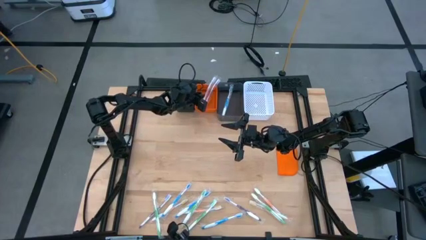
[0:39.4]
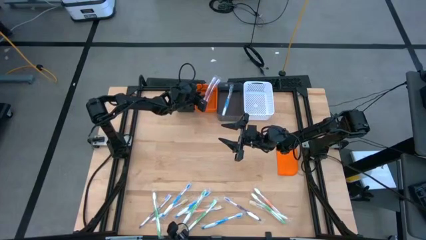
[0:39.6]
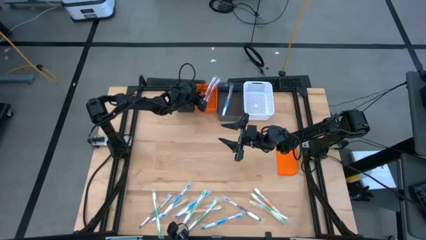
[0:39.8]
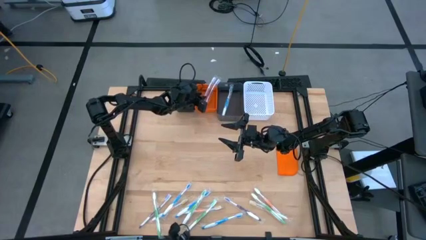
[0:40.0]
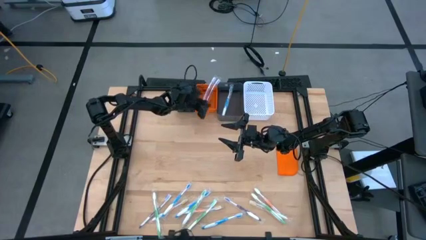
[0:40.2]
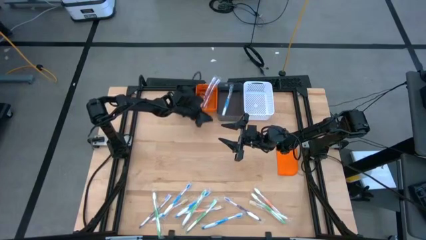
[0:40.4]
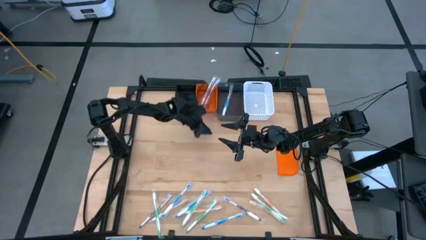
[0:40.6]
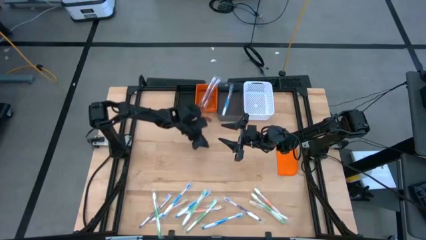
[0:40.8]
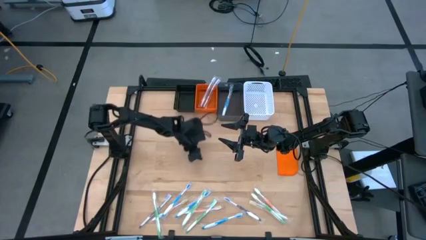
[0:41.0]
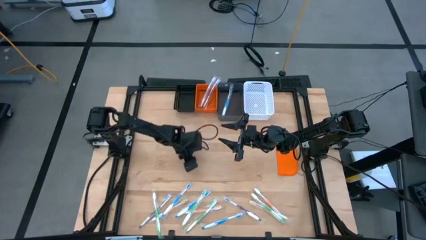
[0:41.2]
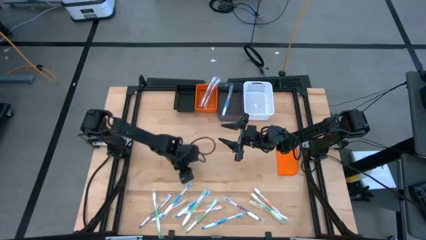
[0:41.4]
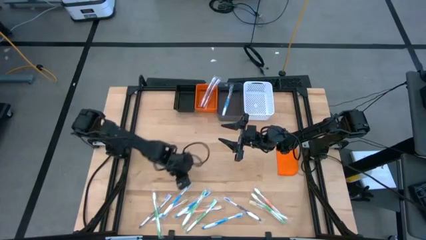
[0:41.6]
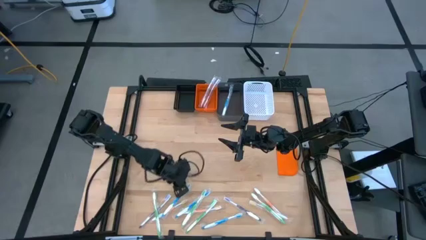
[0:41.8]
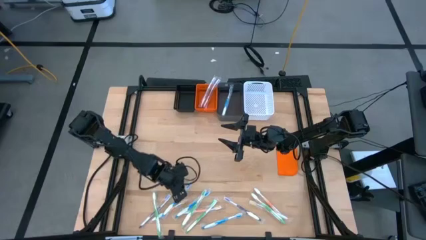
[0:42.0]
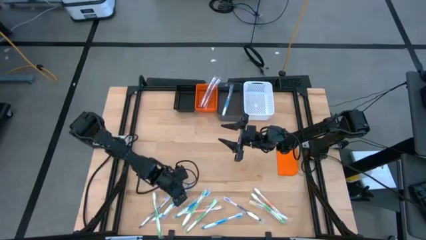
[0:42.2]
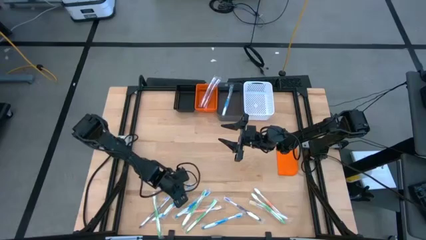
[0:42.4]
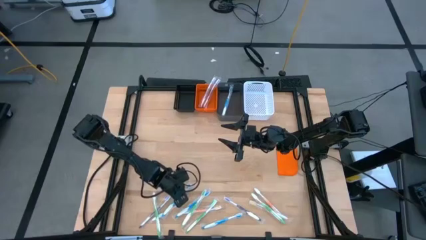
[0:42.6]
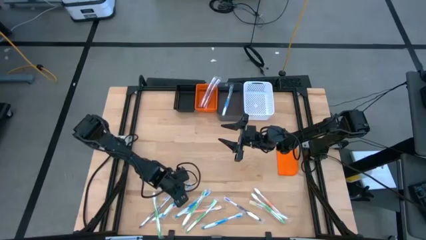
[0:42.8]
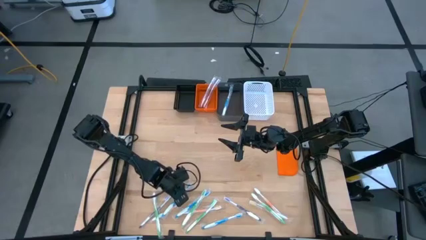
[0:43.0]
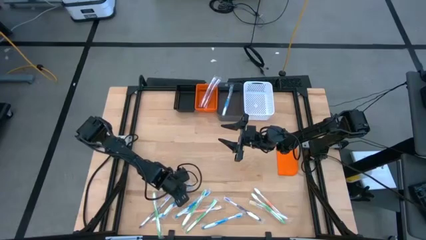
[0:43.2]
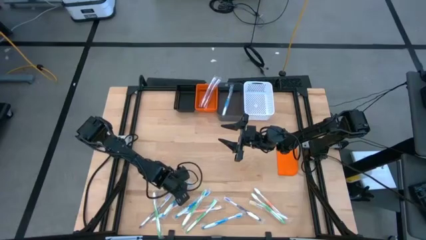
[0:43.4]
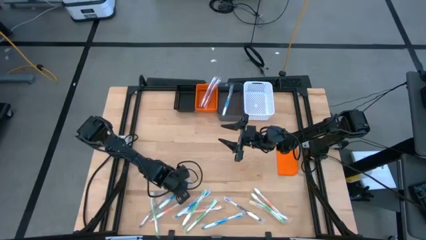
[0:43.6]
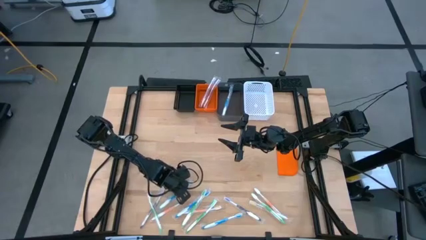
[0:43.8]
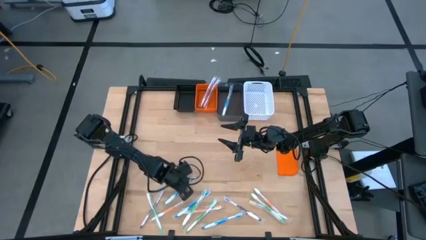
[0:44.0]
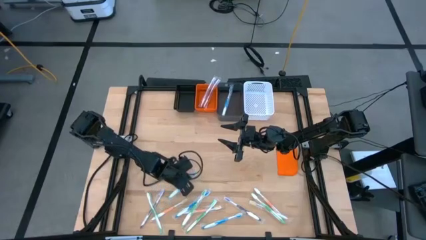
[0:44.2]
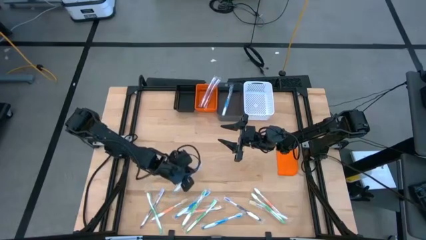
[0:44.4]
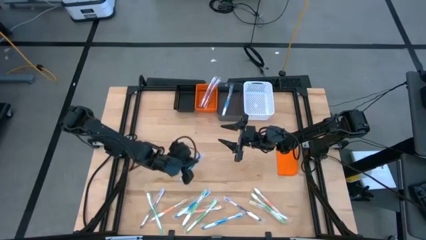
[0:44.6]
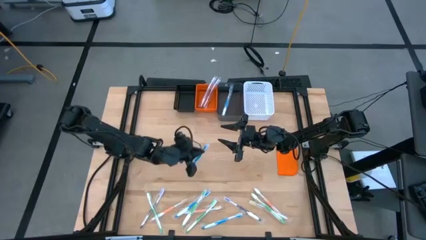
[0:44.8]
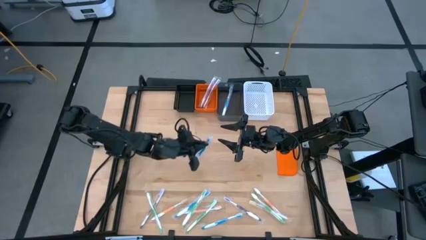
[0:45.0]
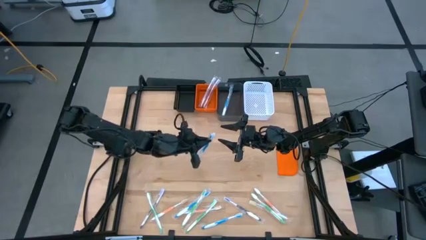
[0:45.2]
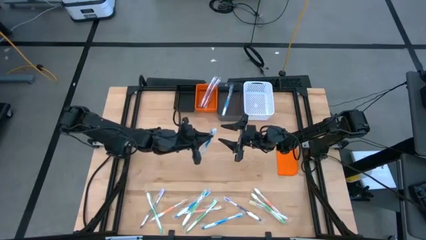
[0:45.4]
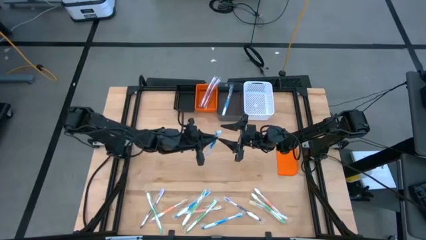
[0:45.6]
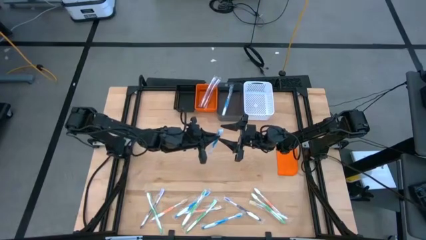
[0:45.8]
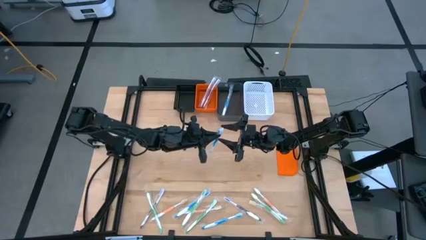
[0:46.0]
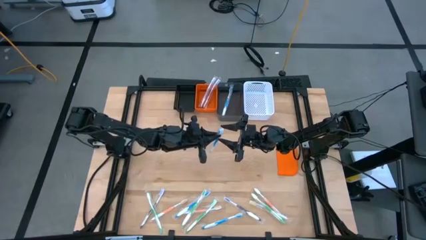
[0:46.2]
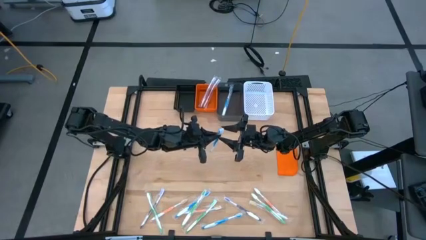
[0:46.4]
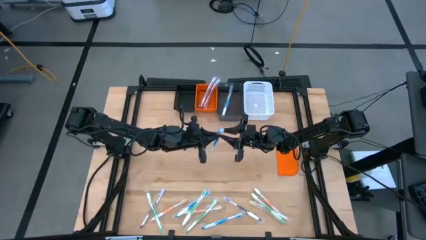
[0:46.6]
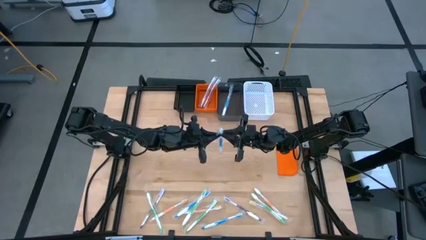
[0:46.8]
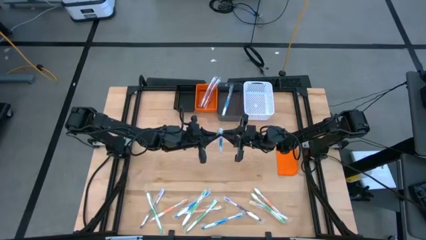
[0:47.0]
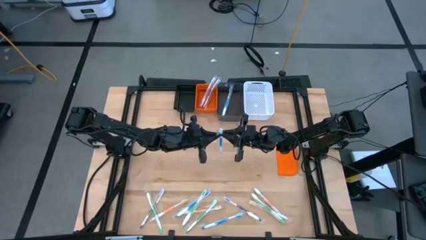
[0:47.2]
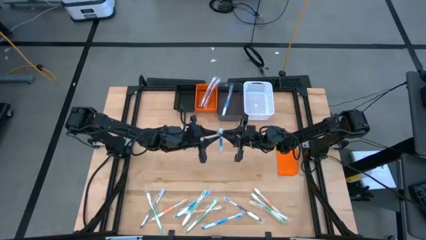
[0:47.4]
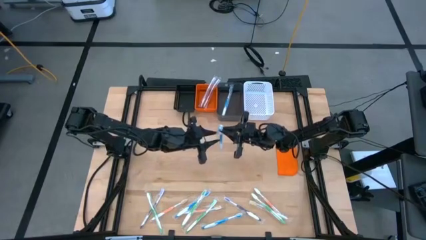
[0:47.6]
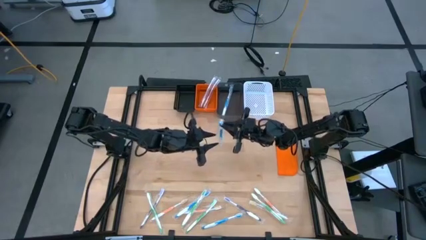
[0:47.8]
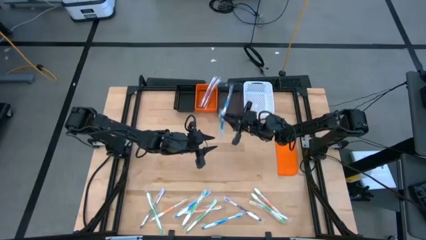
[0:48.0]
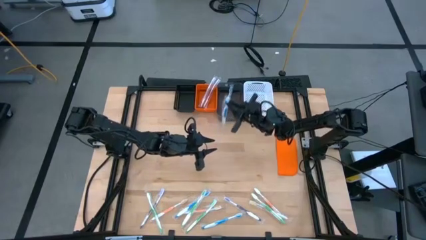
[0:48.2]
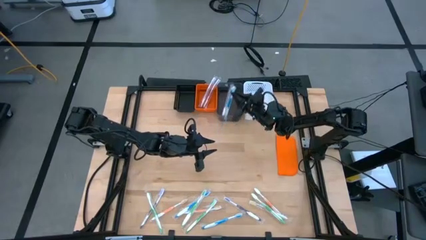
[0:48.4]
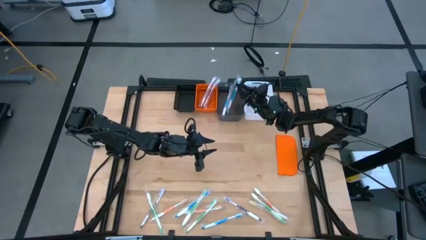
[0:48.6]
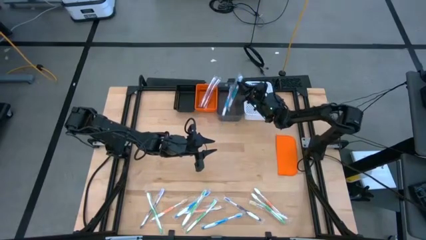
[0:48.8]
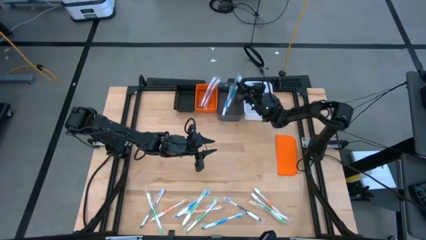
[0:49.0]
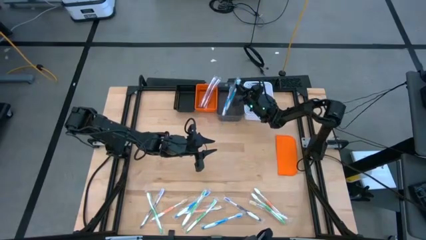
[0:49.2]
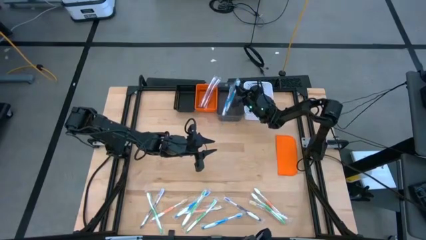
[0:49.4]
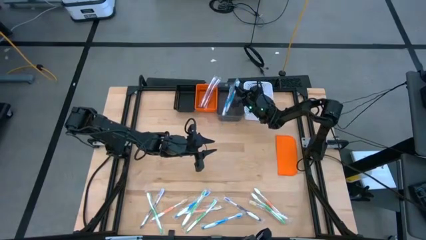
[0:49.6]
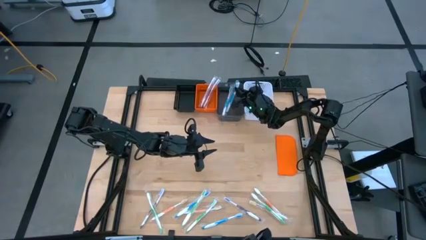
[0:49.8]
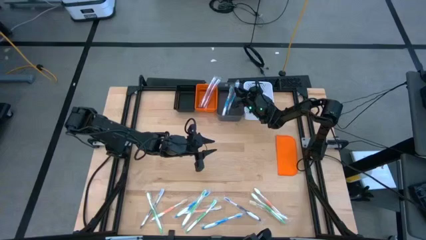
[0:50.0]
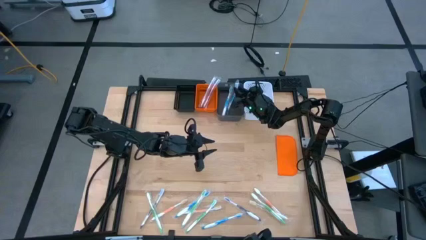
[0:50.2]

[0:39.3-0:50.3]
Task: Pick & Place Toothbrushes
Put the blue toothbrush into the gray bin

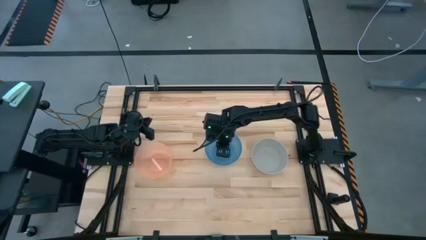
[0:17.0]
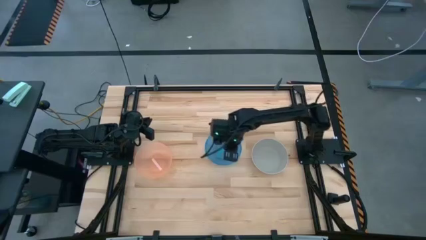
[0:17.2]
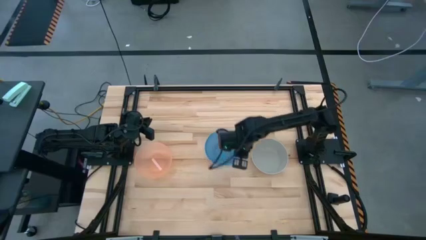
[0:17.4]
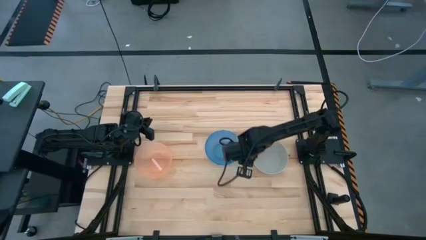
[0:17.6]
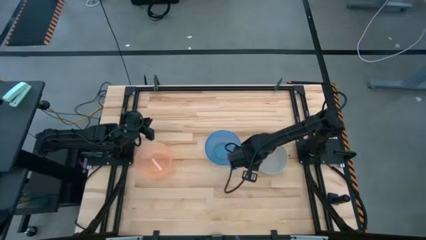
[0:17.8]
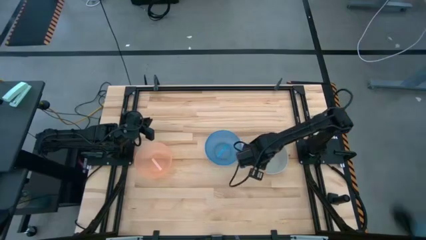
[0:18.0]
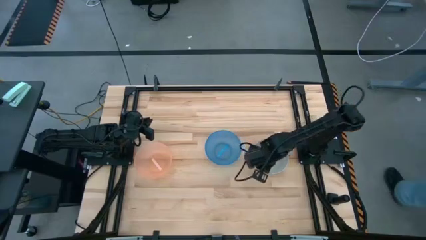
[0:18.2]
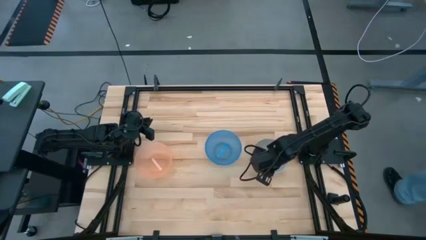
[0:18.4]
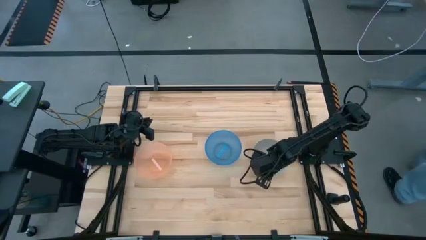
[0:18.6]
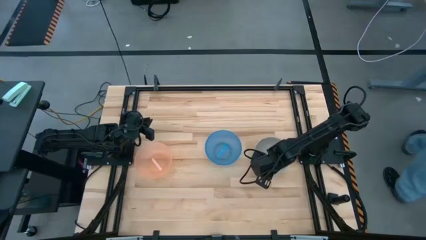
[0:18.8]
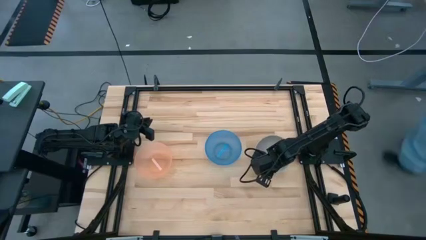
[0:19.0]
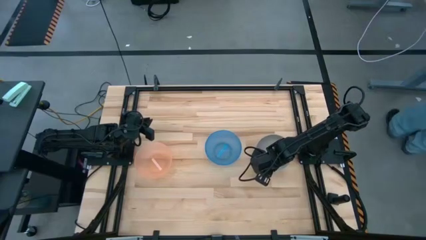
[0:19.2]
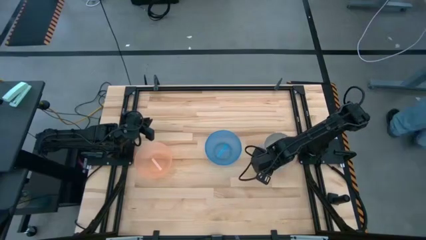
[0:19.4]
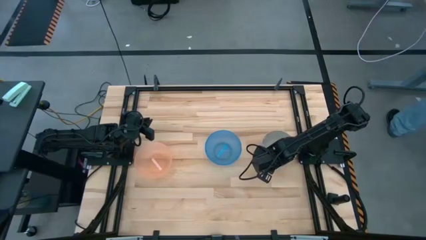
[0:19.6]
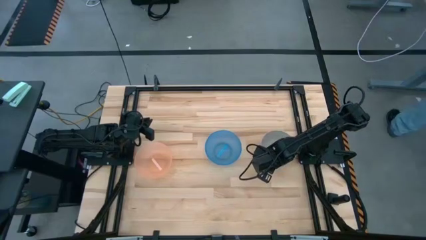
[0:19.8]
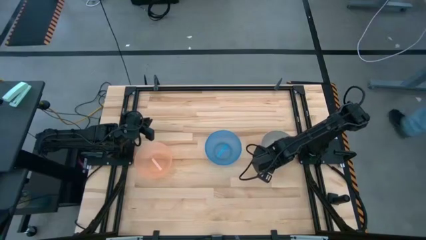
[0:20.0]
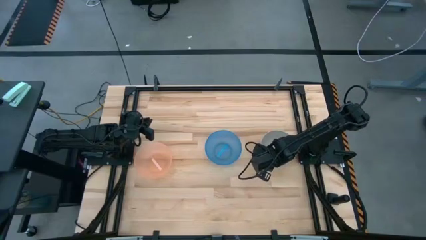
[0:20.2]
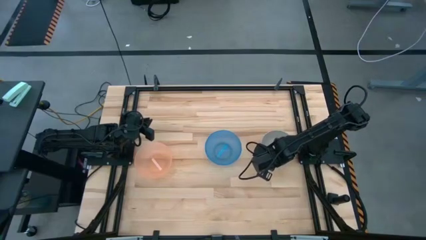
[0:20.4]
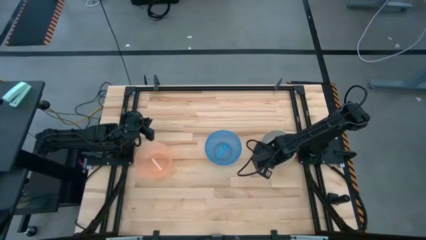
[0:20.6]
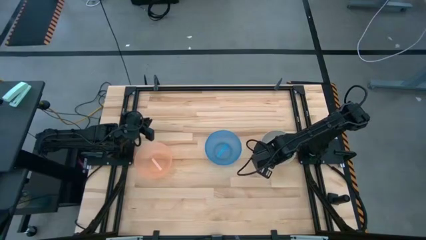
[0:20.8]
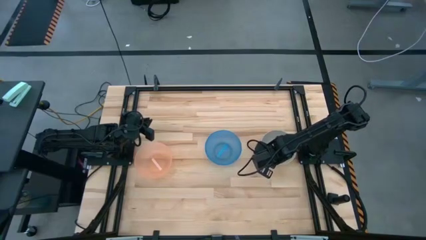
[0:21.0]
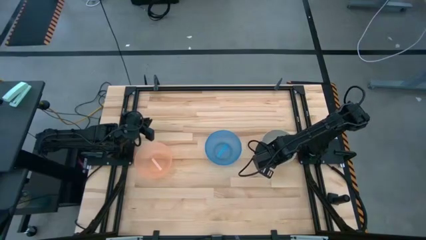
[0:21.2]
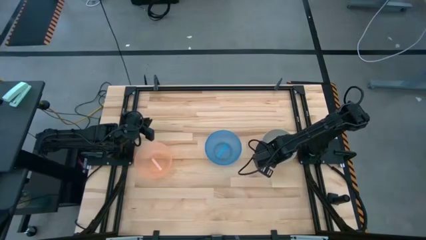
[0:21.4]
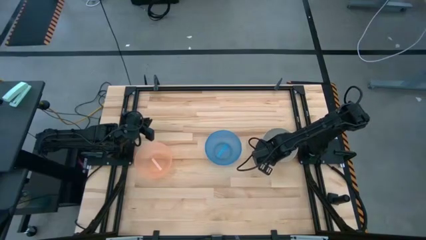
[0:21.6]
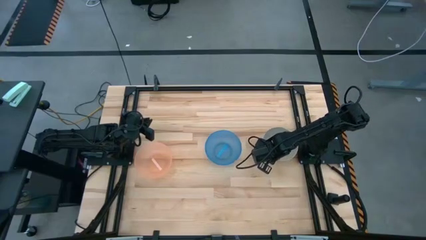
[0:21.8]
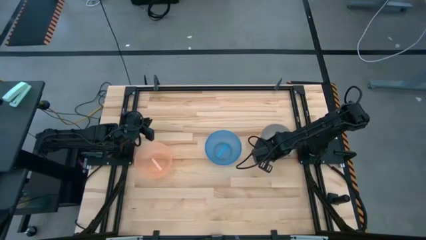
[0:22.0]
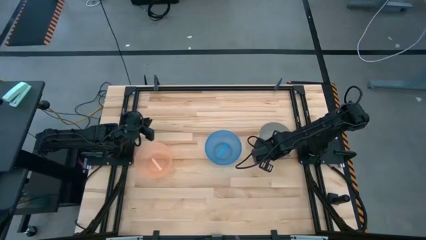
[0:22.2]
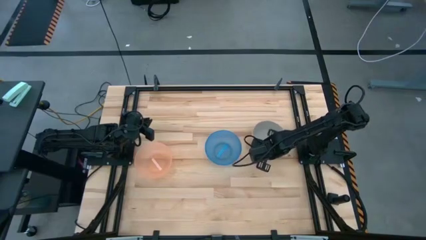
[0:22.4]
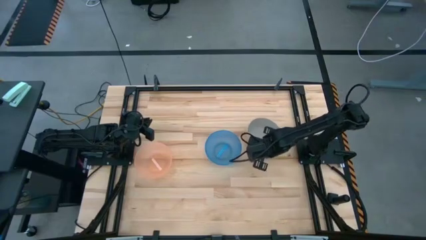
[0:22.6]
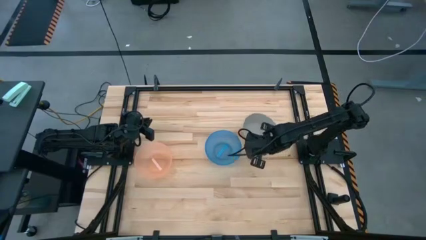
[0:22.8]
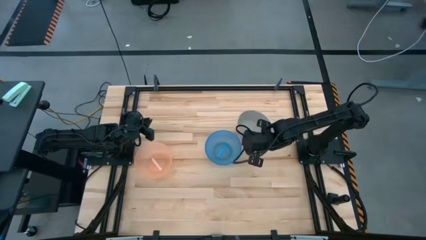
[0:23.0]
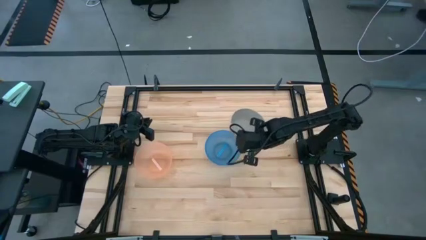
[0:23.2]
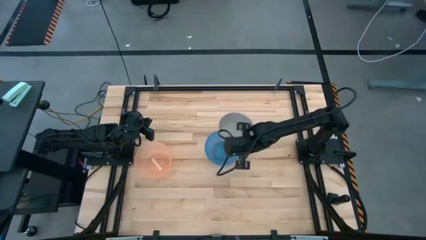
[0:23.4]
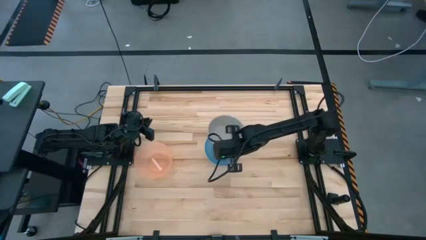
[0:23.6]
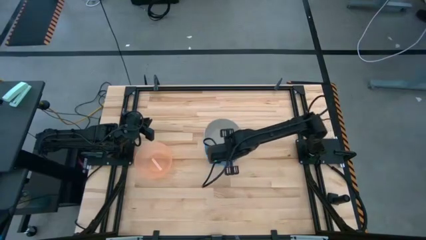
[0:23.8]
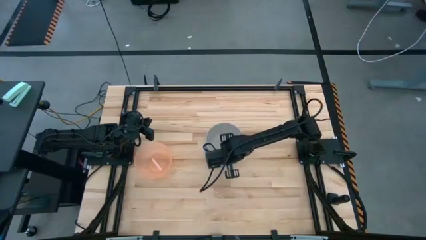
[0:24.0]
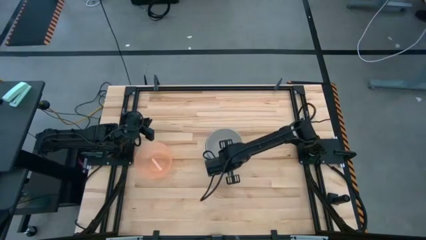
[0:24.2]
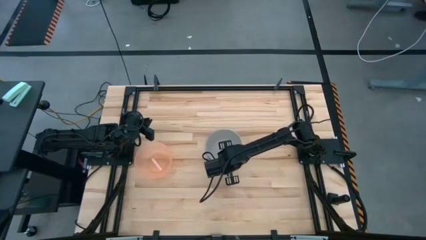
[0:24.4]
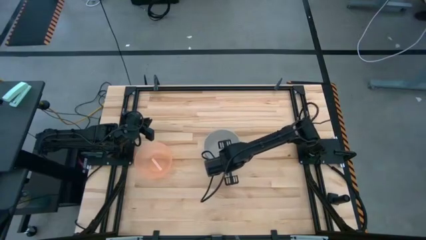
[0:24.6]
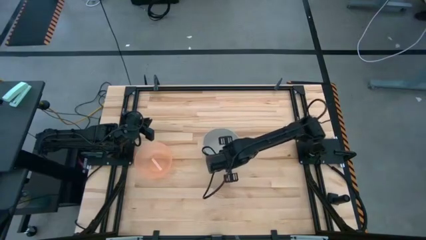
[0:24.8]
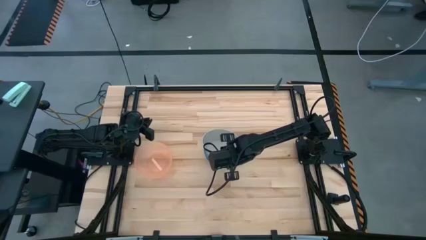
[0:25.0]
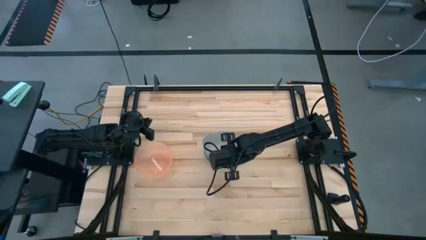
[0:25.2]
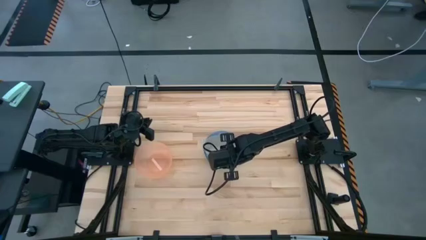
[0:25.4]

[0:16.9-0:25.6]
Task: Nest bowls inside each other
Stack the gray bowl on top of the blue bowl
